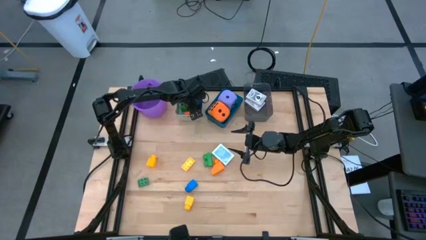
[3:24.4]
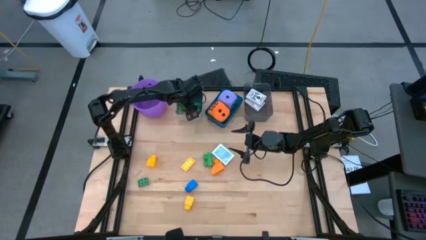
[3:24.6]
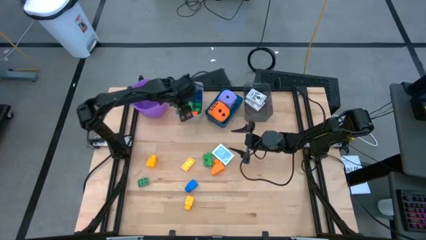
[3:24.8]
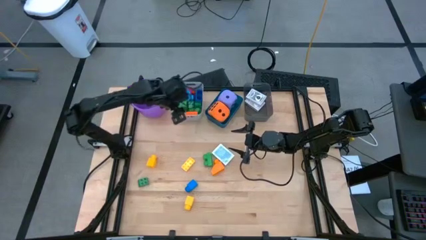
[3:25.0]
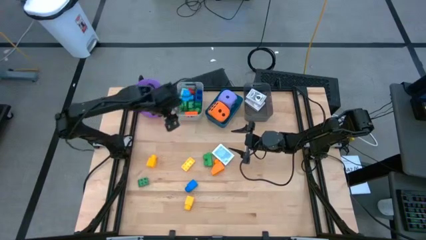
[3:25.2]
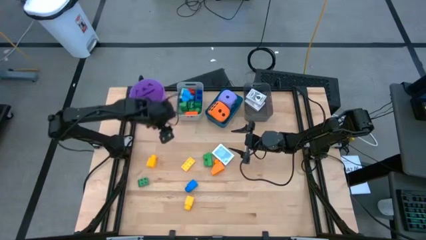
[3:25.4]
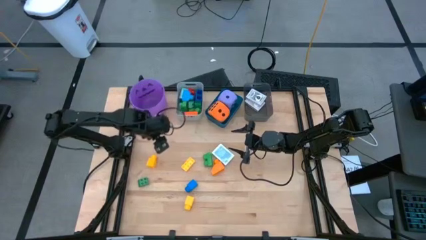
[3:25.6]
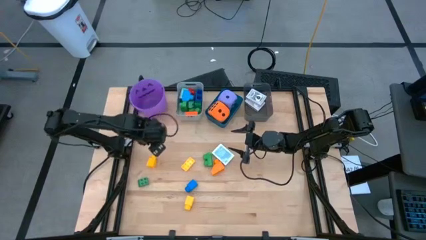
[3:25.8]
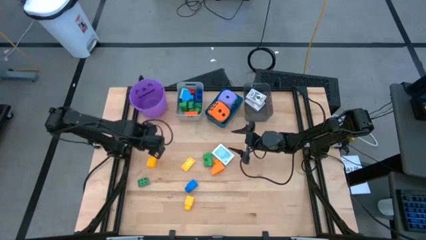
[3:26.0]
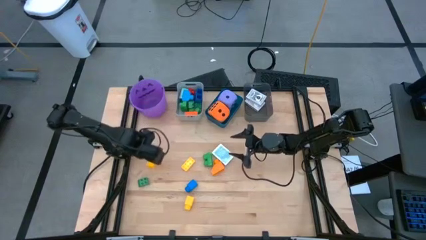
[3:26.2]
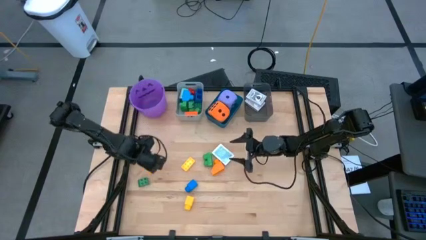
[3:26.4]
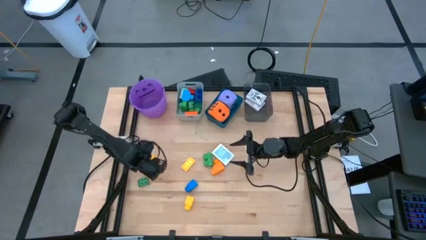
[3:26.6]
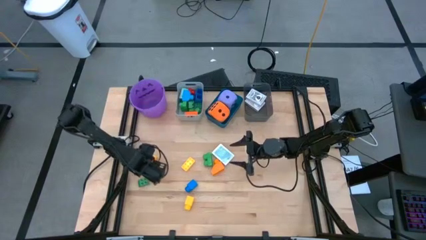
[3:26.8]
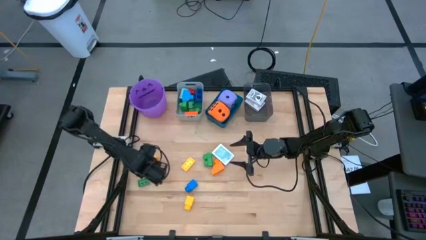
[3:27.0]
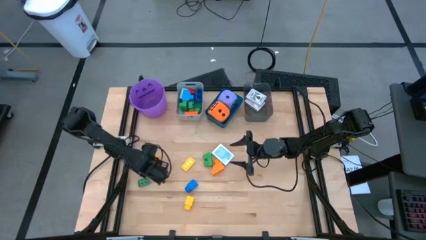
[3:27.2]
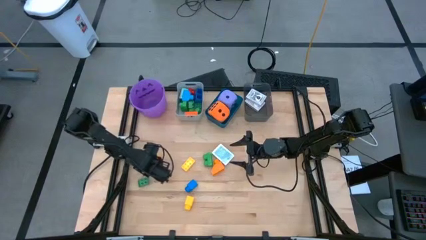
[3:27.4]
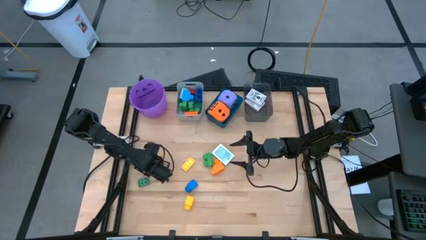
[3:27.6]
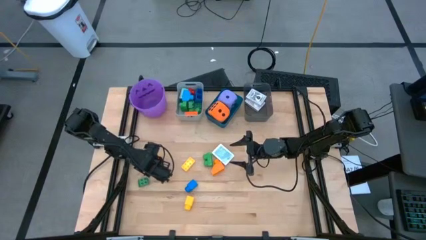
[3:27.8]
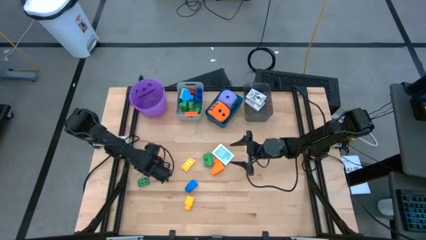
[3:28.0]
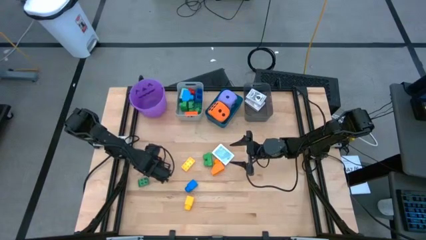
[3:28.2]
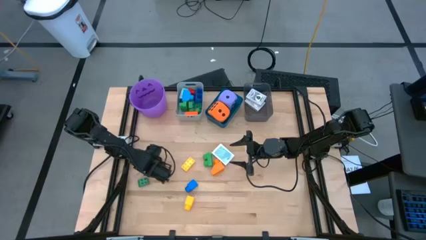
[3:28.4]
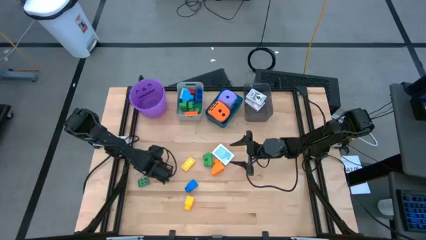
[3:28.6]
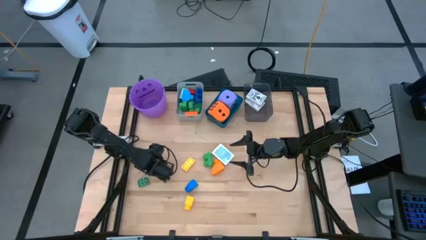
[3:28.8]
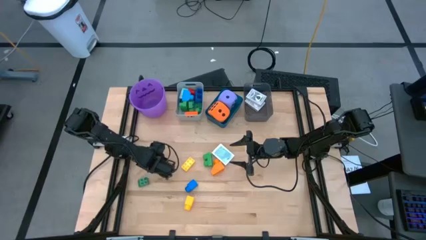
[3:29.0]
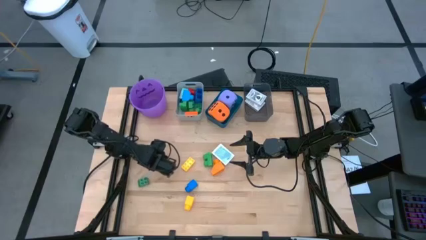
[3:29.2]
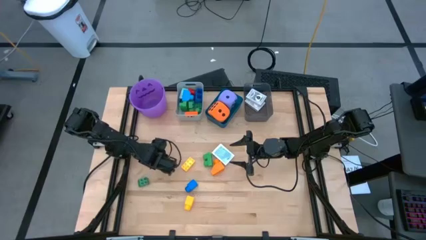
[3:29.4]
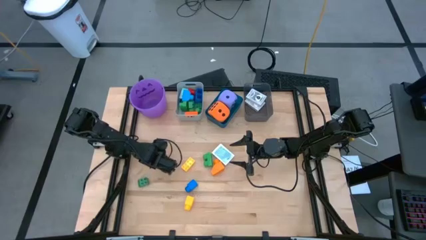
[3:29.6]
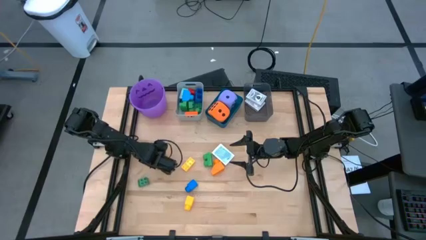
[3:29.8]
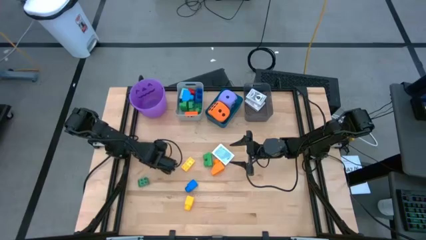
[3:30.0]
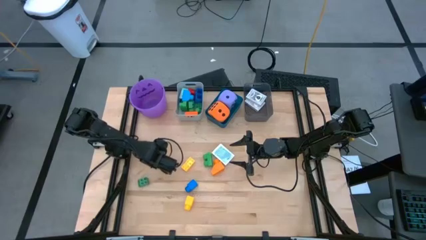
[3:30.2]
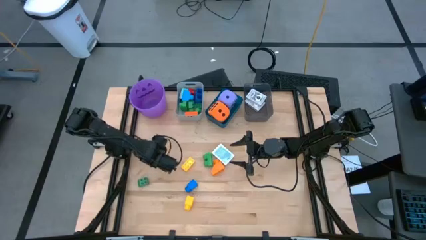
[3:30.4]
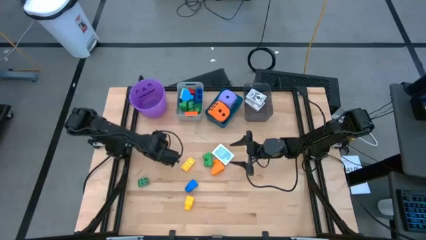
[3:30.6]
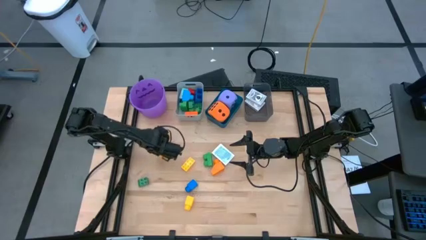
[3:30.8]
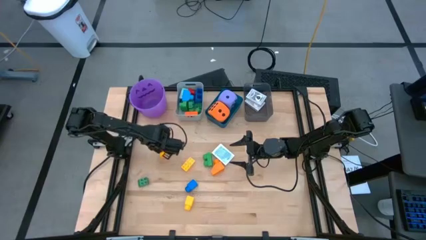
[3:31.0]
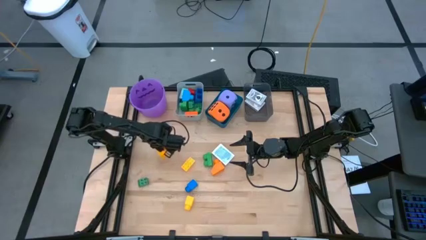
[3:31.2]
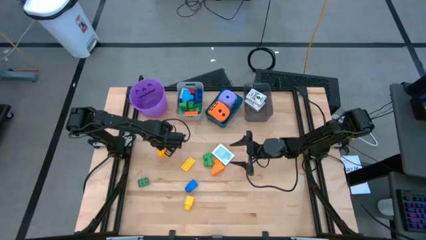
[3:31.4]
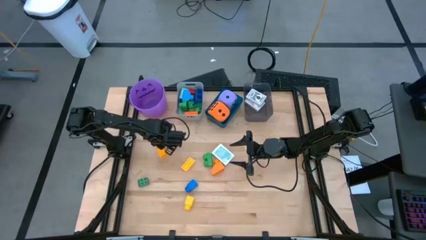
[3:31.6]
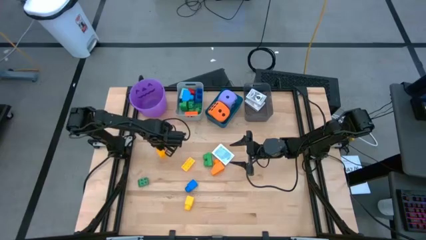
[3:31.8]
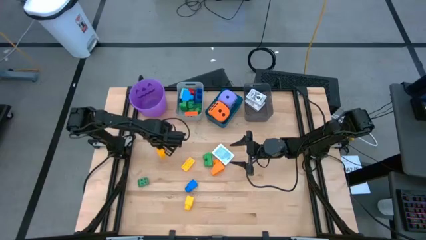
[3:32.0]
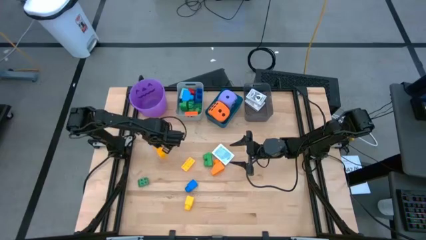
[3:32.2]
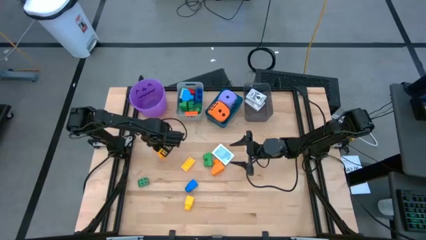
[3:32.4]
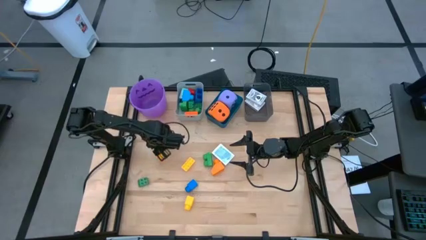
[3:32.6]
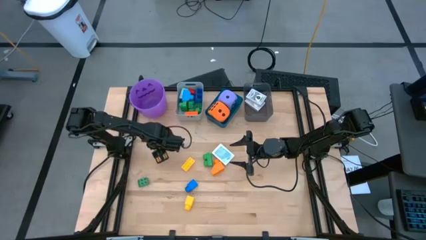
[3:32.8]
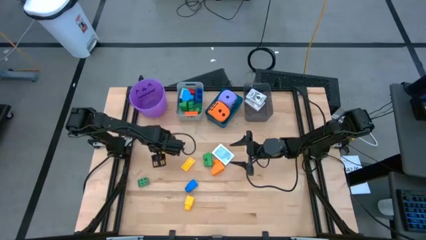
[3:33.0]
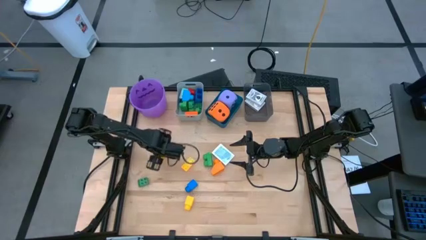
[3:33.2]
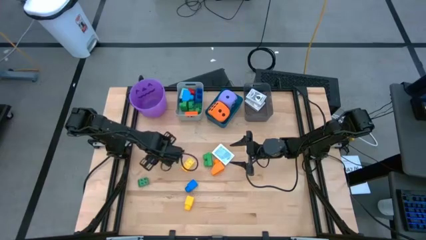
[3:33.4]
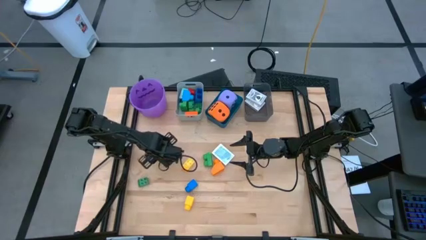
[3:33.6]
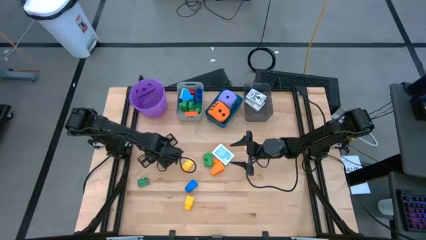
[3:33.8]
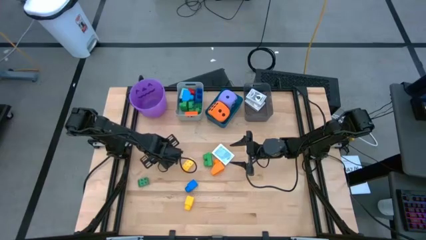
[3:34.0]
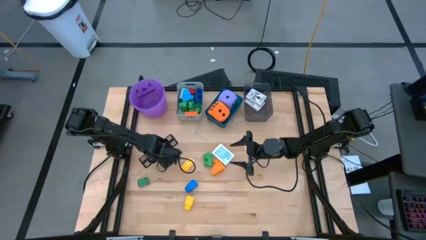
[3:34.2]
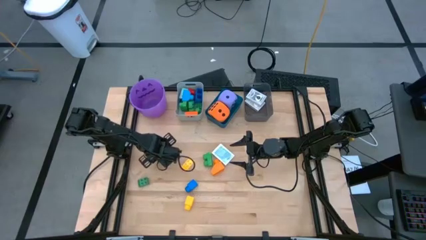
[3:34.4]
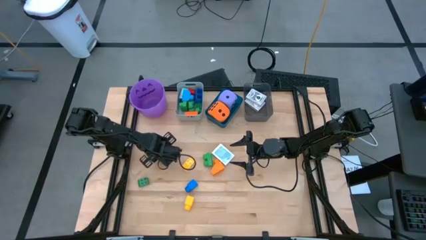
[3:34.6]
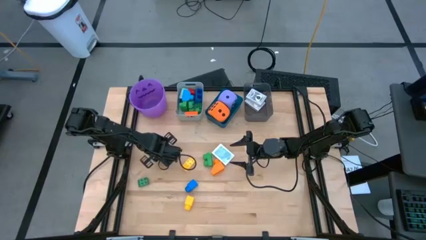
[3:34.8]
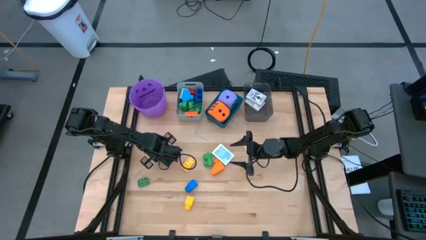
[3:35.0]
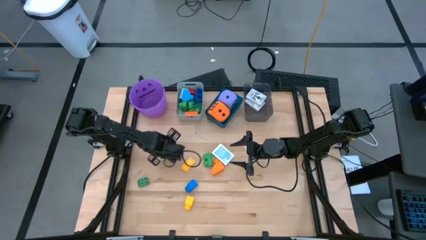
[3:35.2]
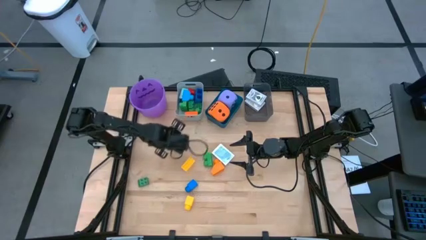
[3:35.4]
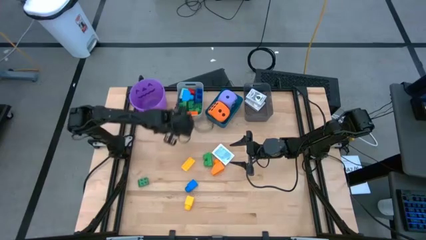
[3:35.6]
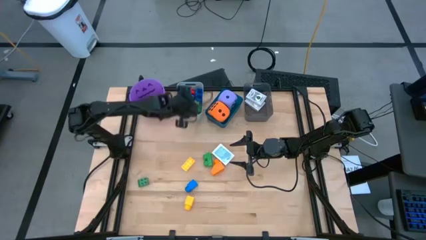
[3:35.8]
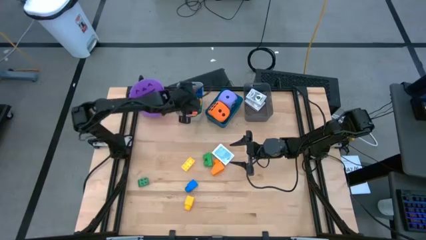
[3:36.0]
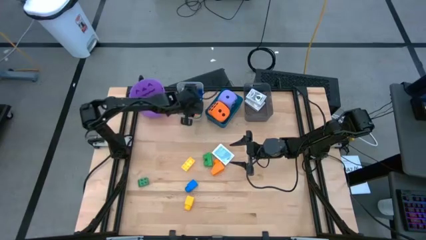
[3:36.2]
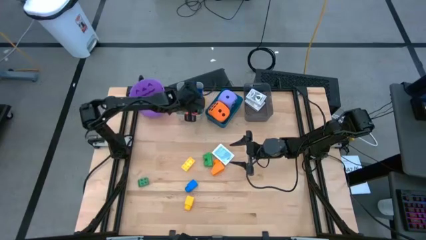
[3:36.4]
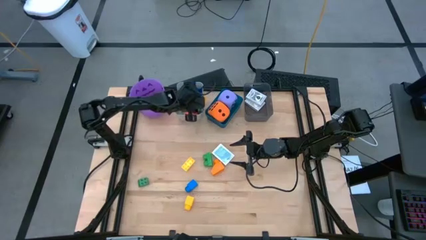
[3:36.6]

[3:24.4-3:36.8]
Task: Pick & Place Toys
Put the yellow game piece into the gray bin

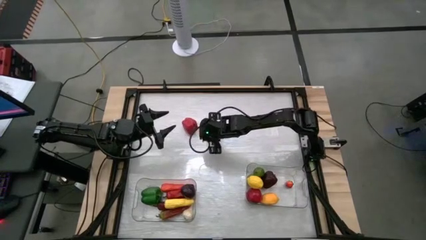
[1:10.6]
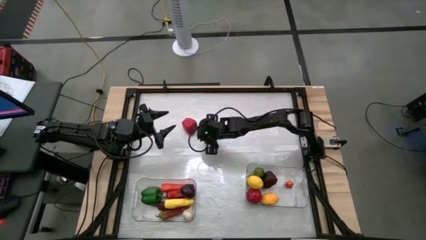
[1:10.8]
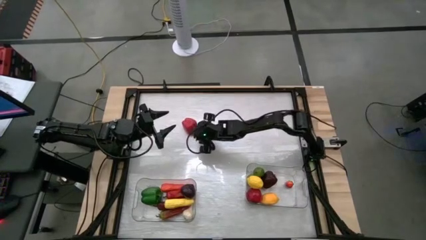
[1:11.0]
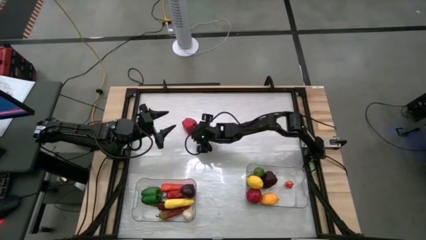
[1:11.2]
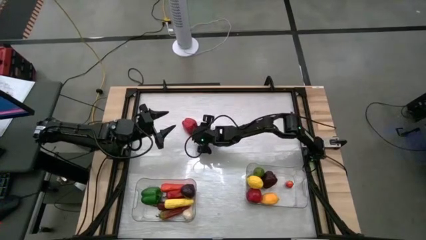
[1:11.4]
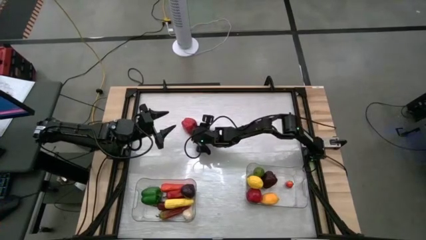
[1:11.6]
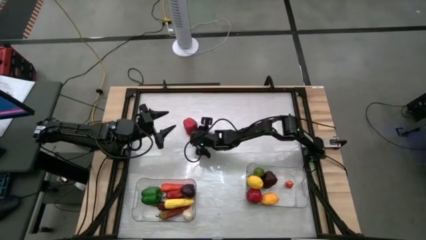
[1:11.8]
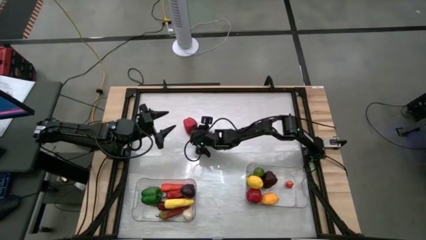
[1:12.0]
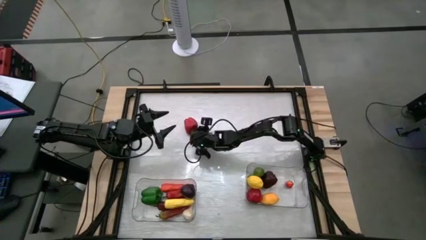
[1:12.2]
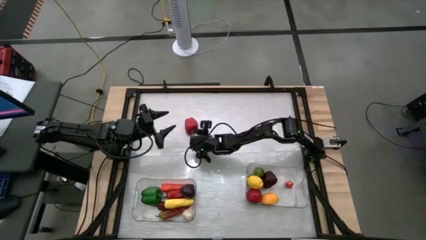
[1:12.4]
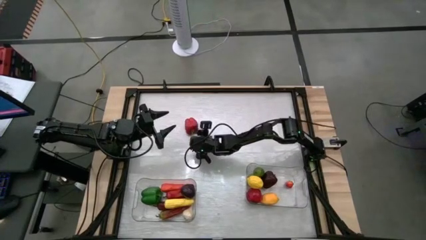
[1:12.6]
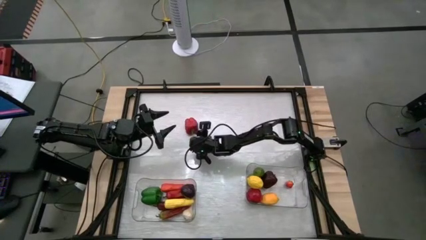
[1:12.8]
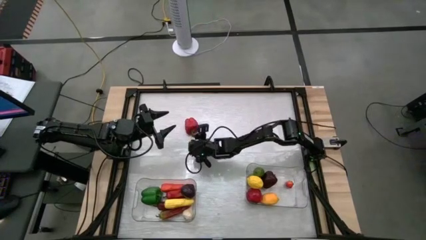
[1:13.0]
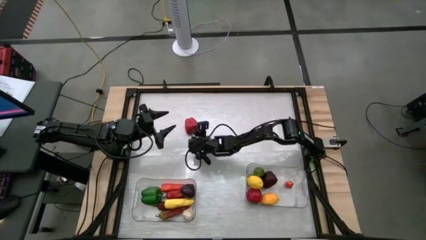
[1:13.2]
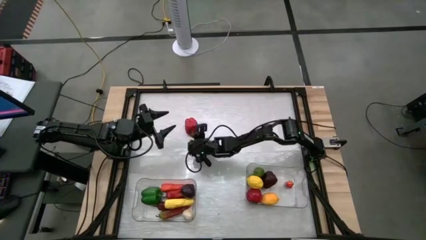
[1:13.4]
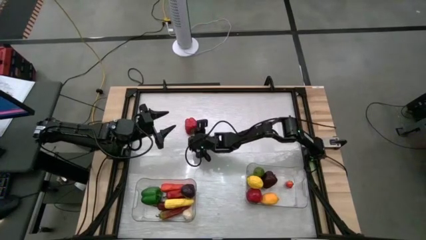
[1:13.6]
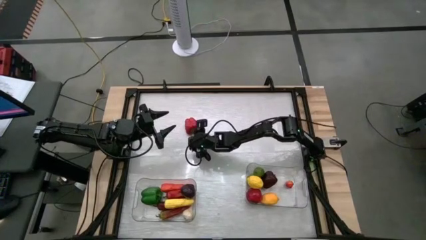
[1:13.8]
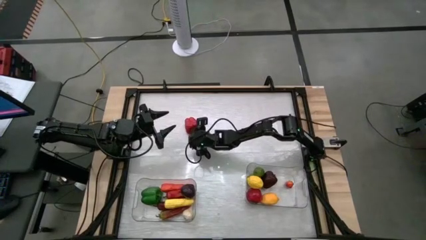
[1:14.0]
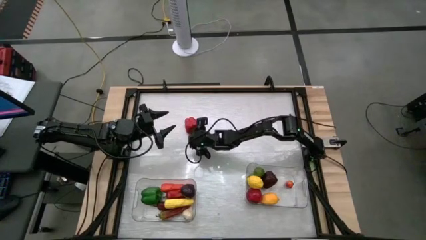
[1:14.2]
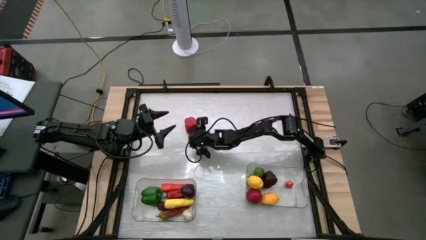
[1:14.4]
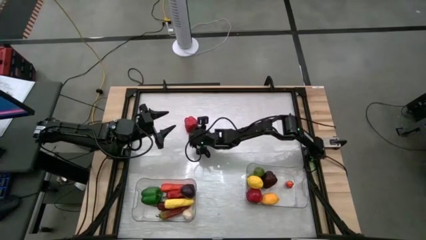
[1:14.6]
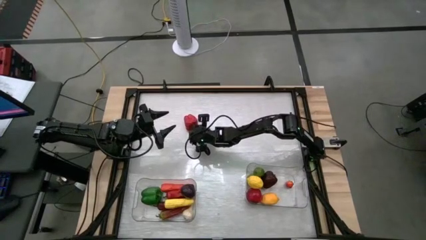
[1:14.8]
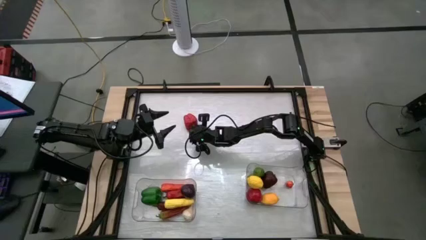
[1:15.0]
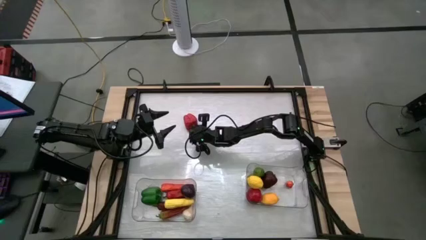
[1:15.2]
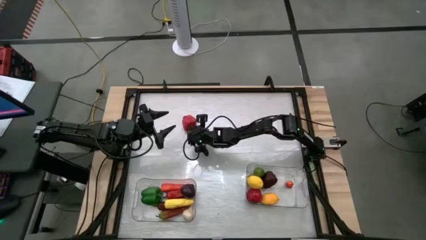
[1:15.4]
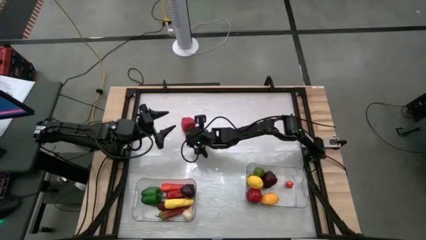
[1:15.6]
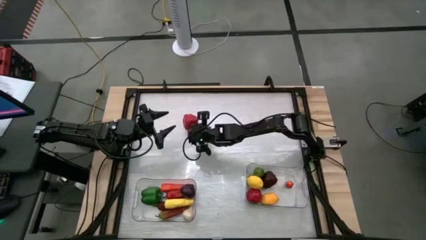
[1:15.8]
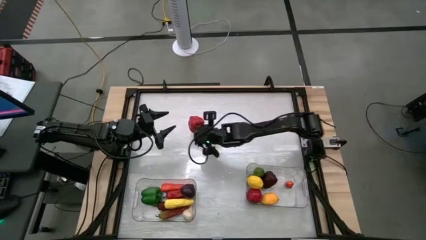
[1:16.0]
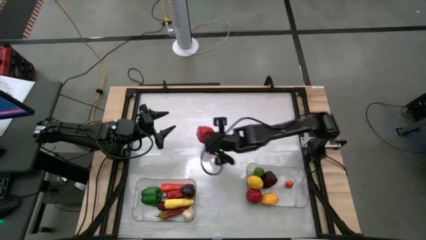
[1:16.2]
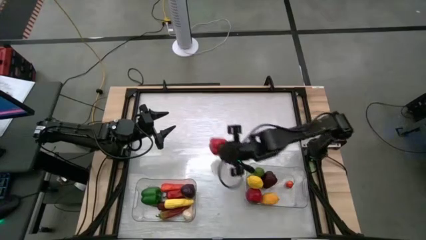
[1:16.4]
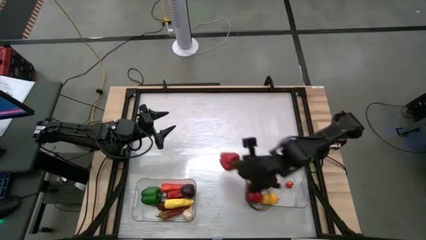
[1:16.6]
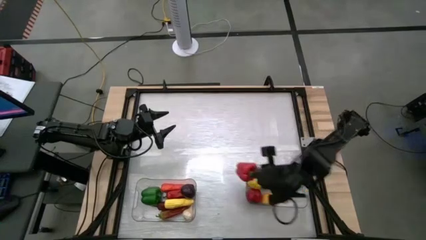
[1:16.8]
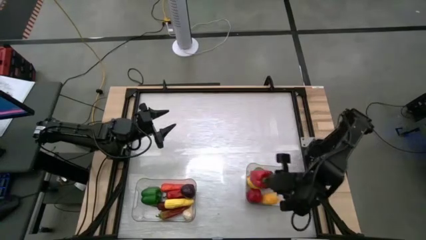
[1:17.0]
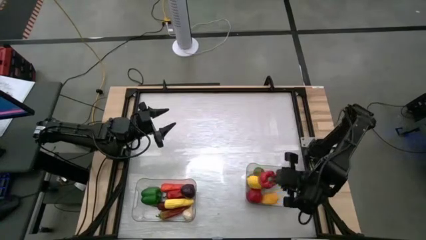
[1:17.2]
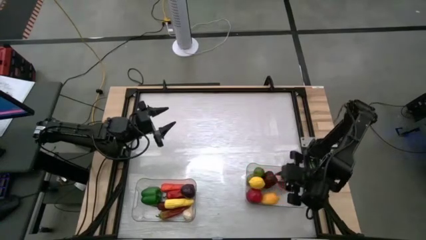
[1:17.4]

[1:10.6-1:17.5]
Task: Sort produce into baskets
Put the red bell pepper into the right transparent bin
